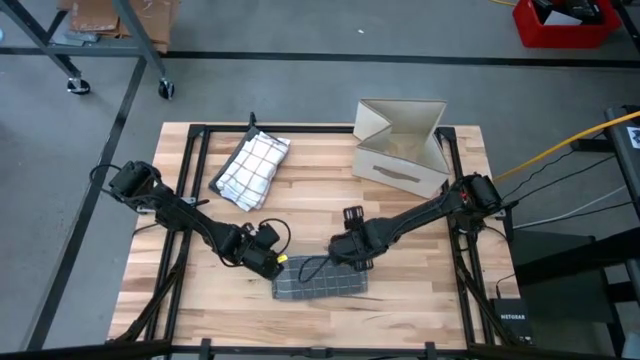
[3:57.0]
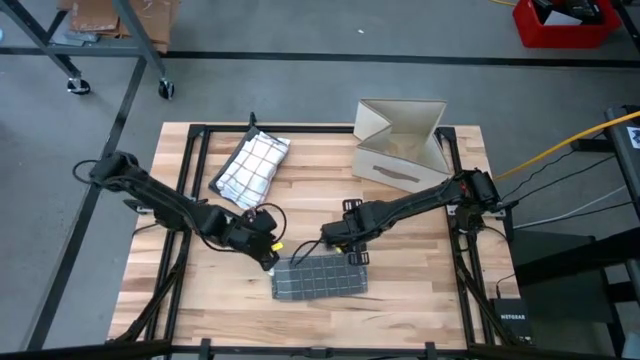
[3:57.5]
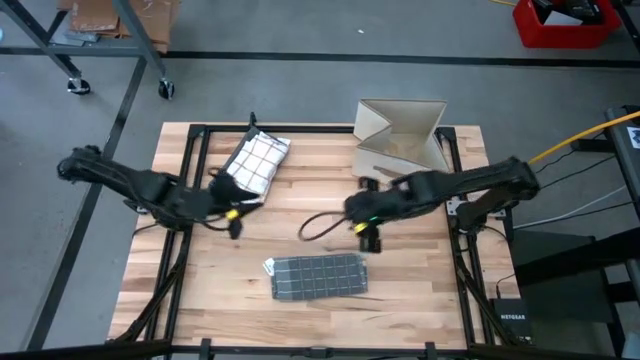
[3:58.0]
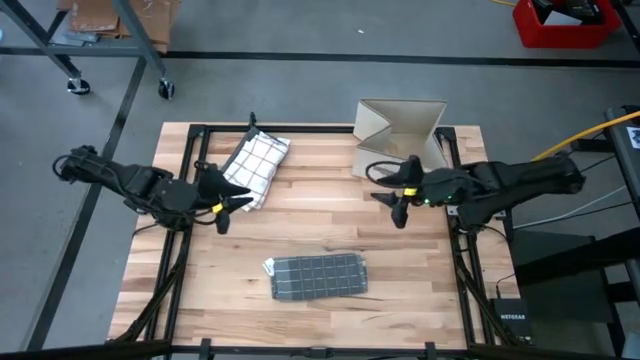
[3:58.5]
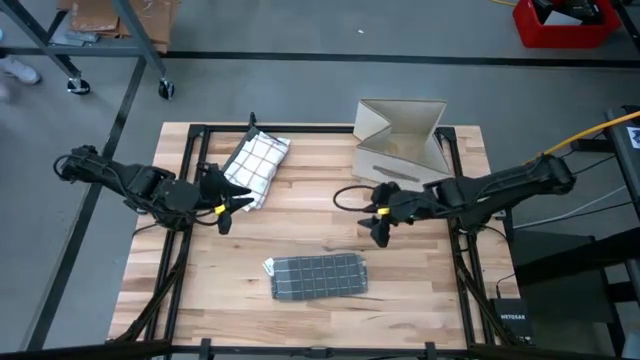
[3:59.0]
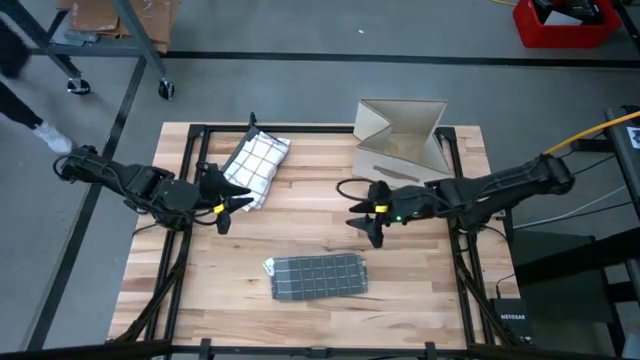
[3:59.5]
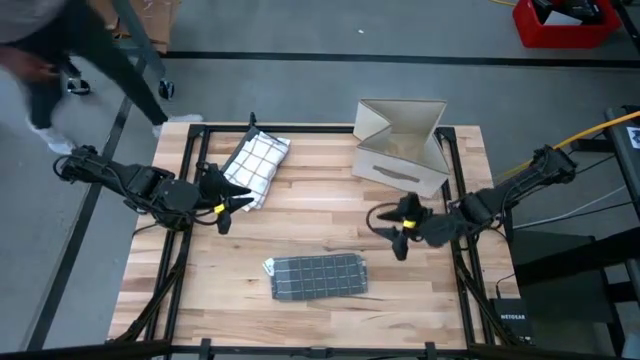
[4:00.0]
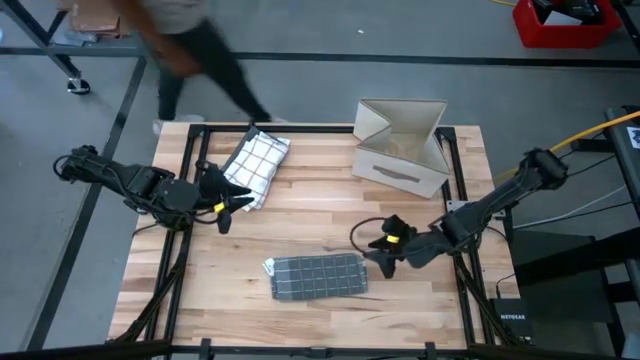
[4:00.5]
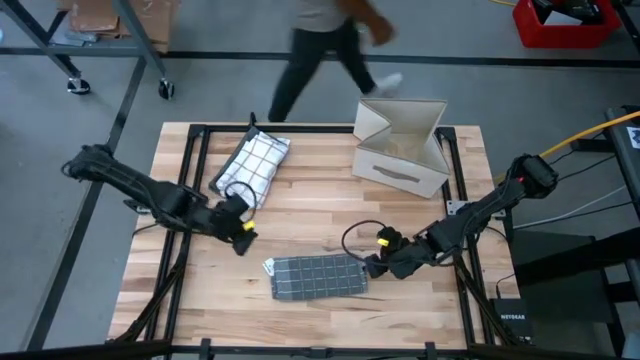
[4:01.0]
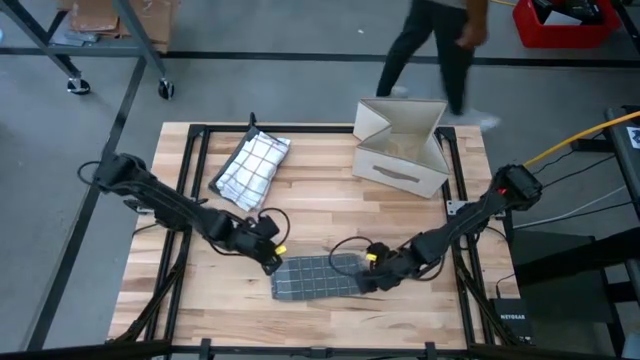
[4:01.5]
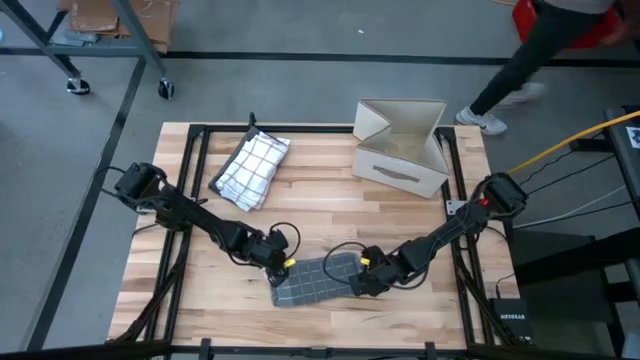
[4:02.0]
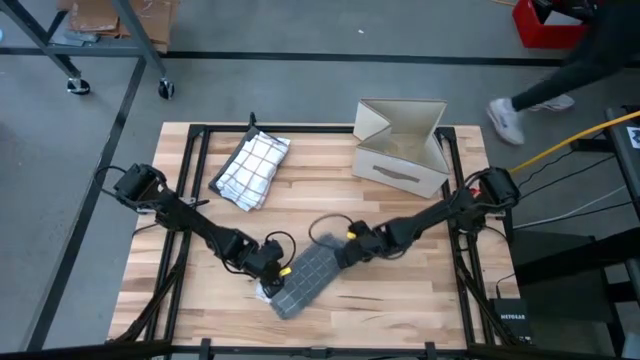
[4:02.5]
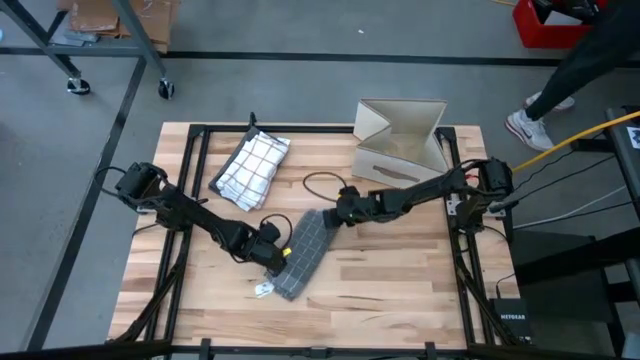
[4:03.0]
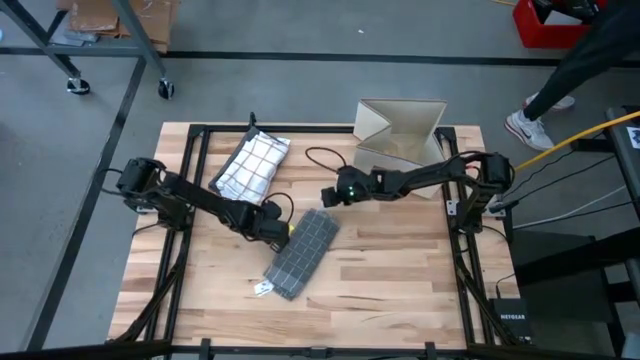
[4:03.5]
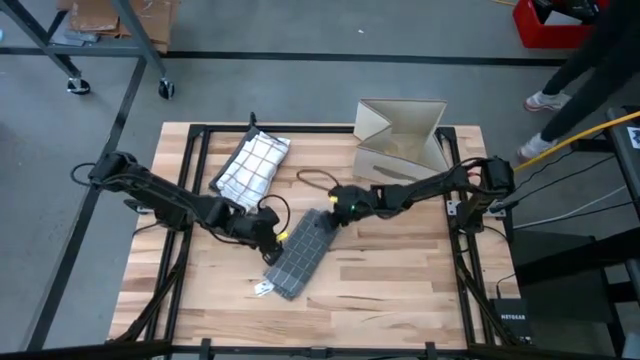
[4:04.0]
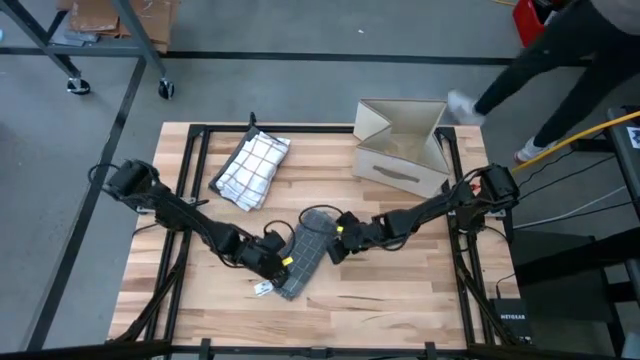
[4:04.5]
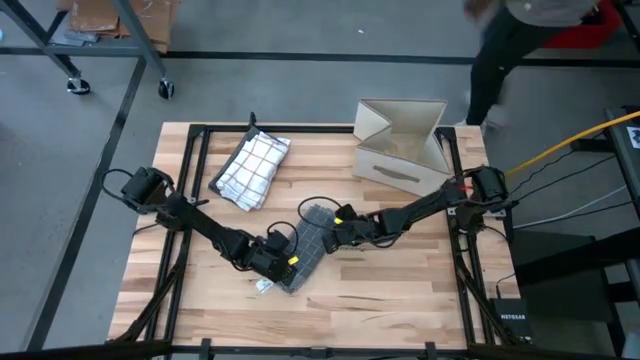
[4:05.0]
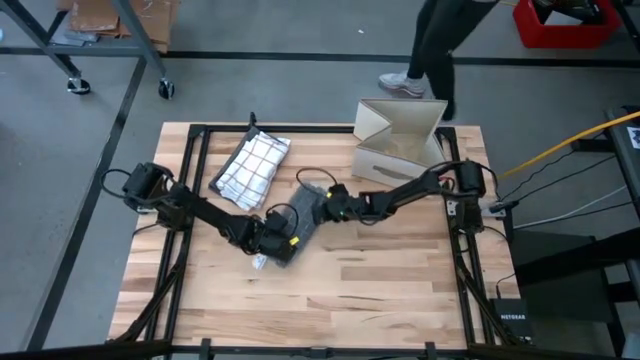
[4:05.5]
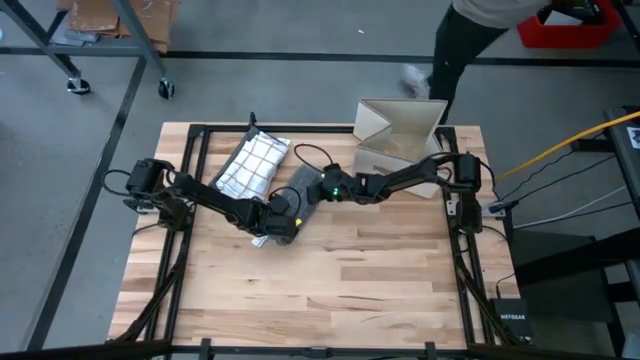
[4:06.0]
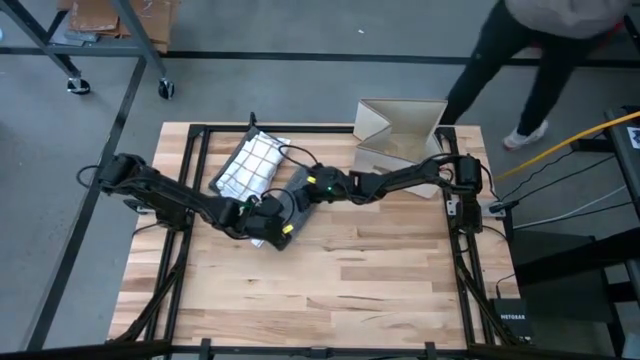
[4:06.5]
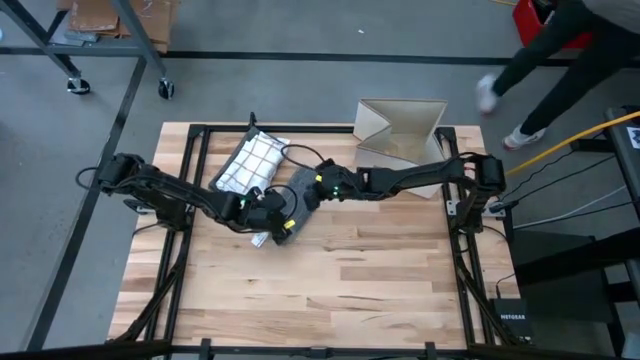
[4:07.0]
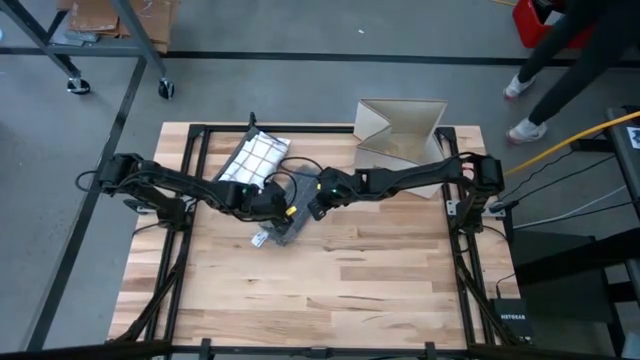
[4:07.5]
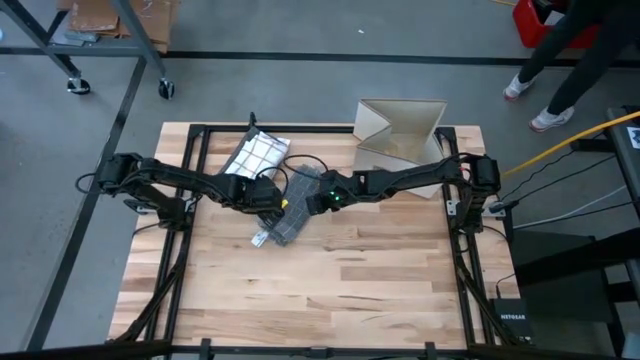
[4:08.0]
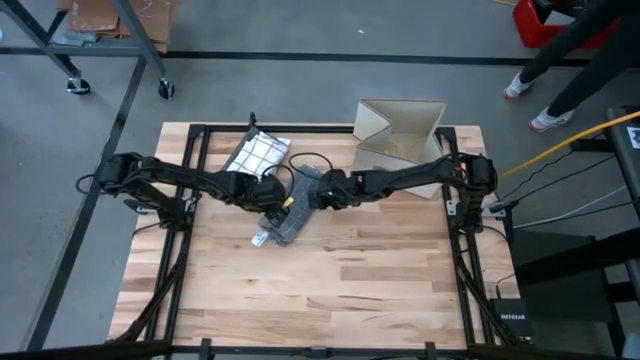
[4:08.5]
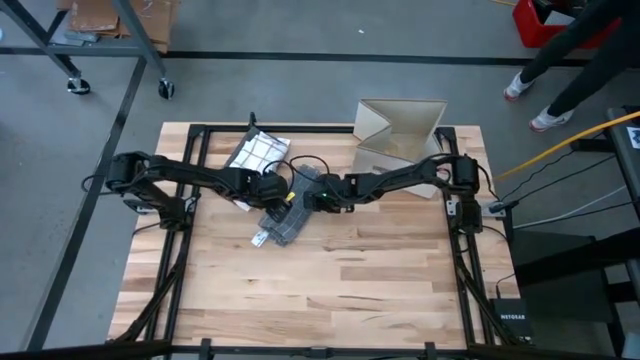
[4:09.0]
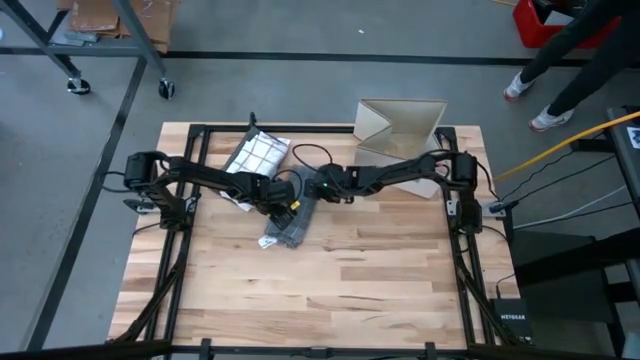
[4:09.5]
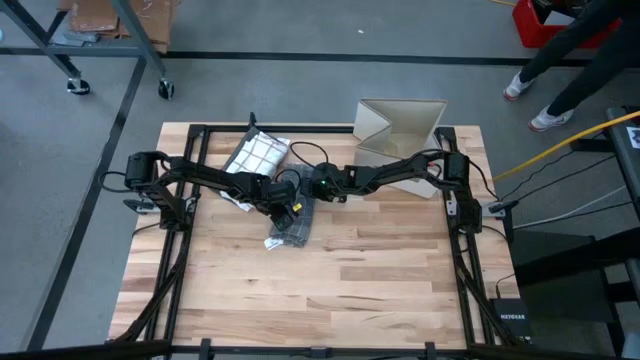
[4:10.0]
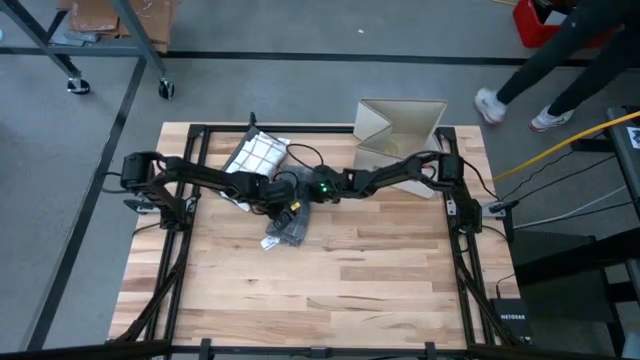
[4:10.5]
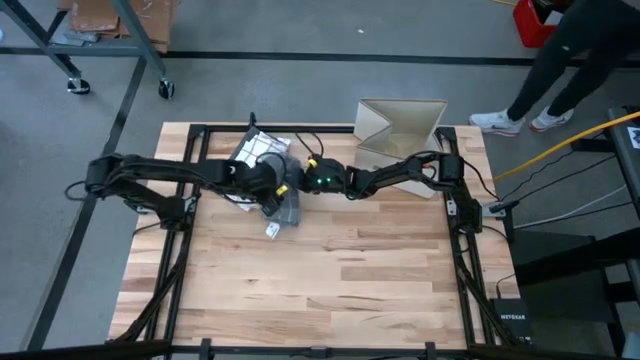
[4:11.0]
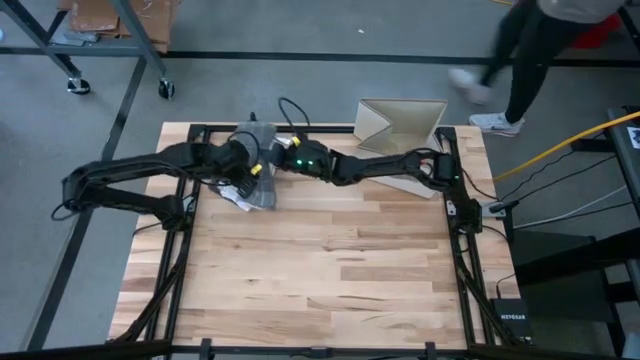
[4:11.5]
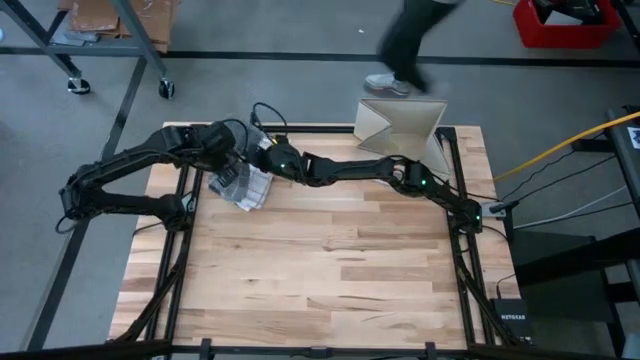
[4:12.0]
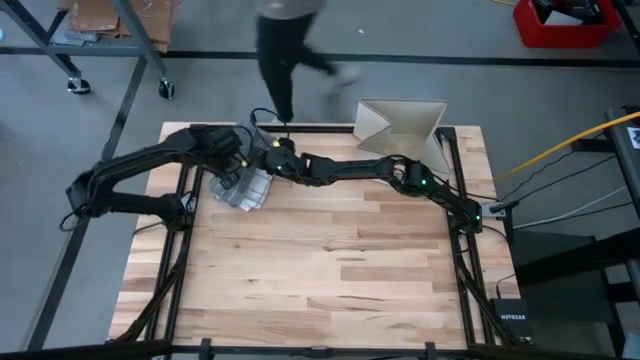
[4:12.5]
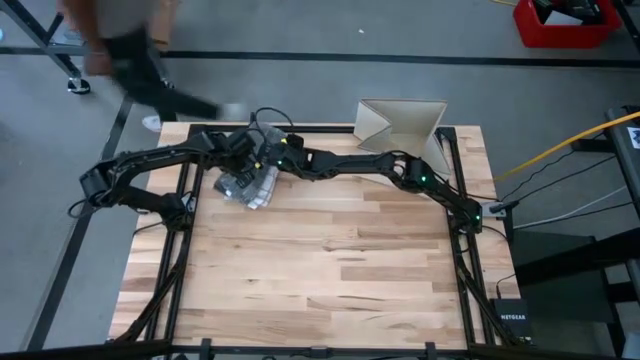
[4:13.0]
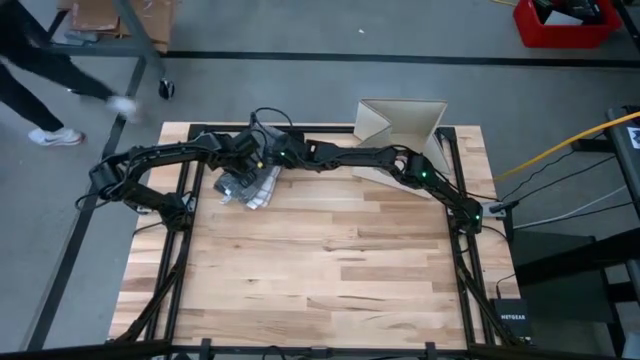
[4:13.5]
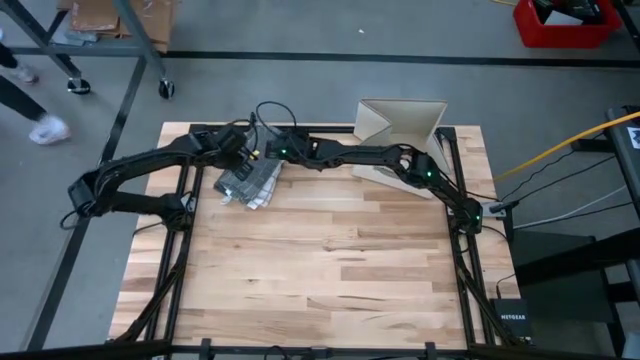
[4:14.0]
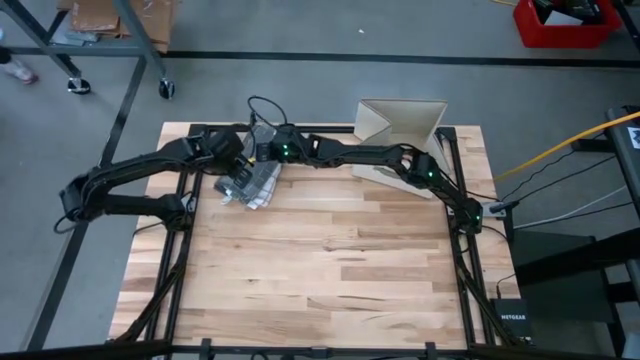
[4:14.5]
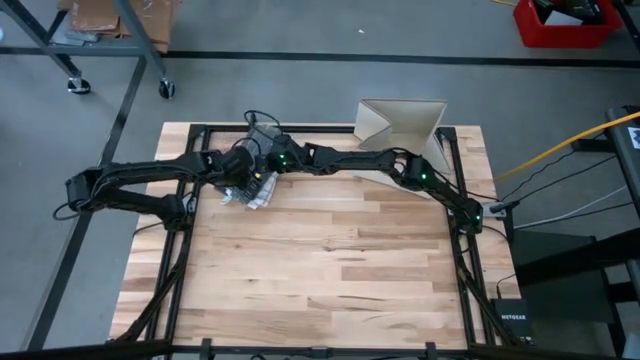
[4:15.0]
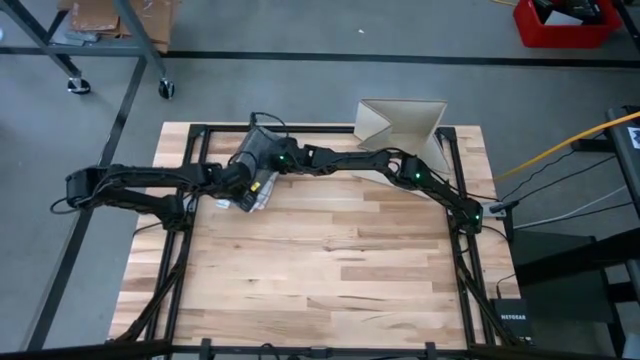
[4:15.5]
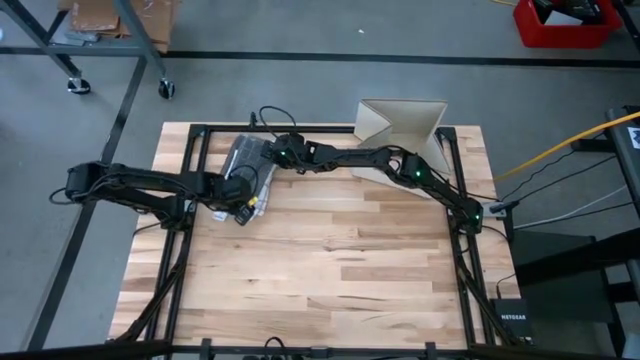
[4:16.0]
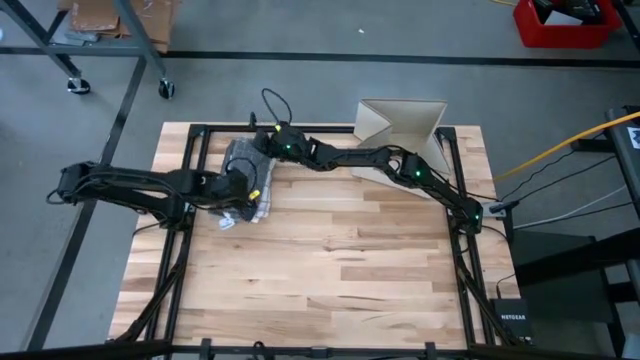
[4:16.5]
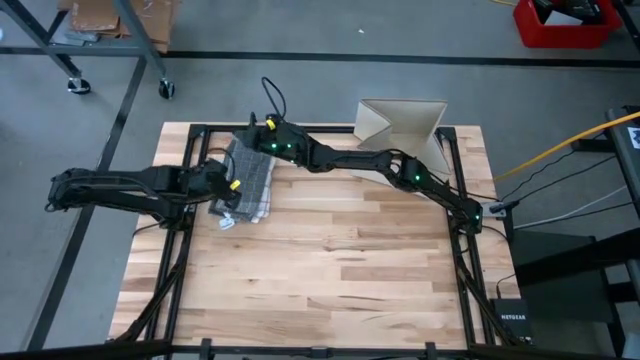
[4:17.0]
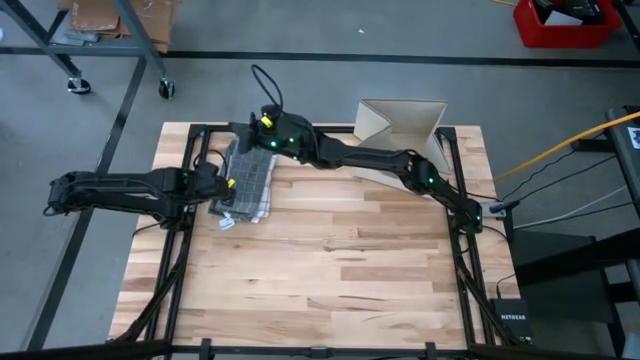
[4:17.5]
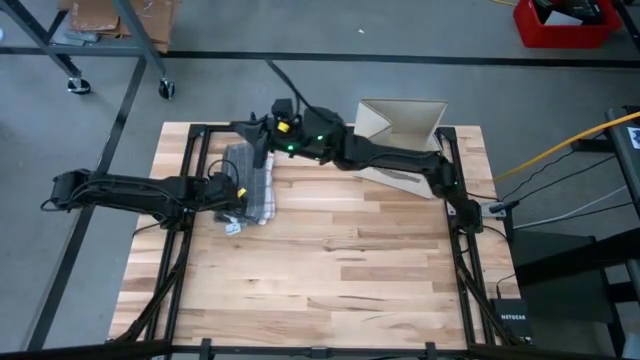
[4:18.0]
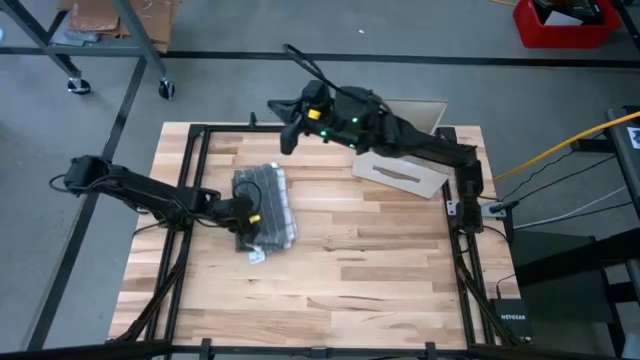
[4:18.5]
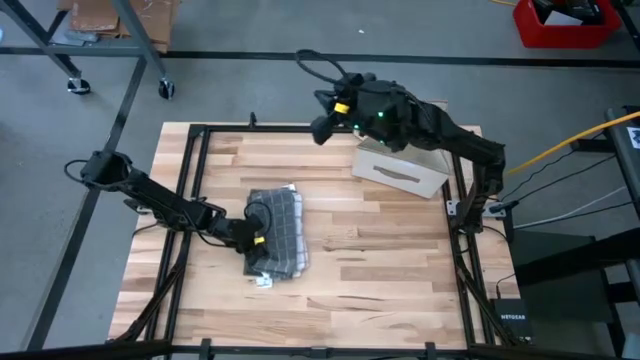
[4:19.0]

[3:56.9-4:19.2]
Task: Fold towel
Stack the folded gray white kitchen towel on top of the folded white kitchen towel
